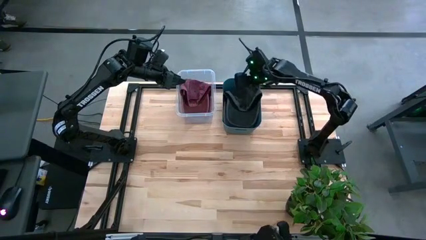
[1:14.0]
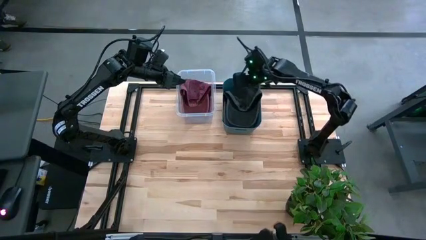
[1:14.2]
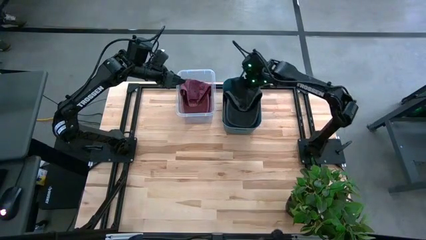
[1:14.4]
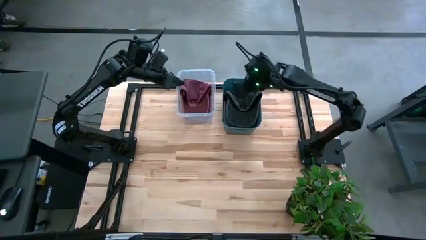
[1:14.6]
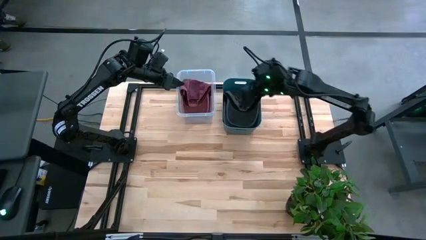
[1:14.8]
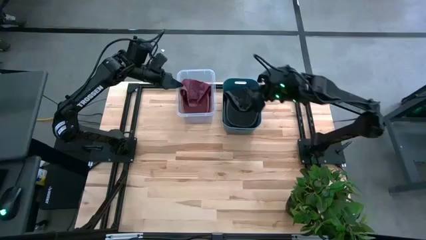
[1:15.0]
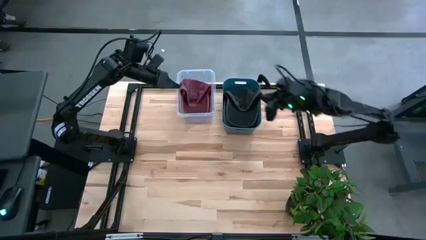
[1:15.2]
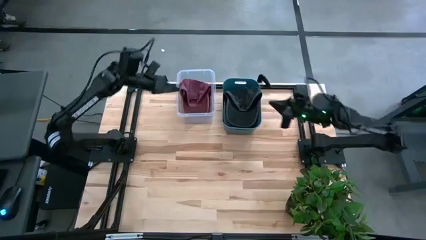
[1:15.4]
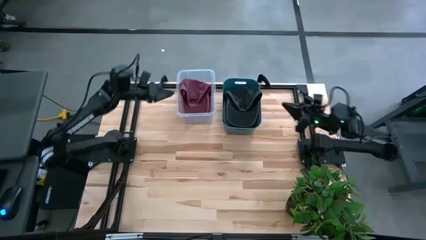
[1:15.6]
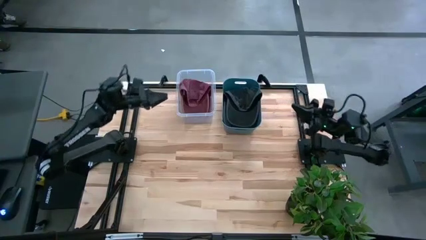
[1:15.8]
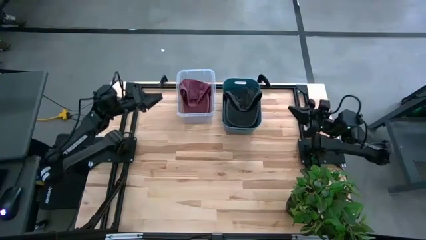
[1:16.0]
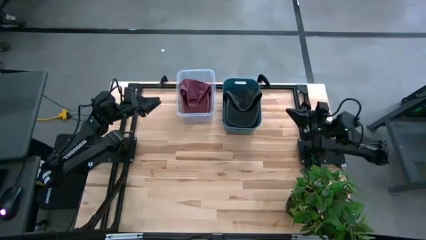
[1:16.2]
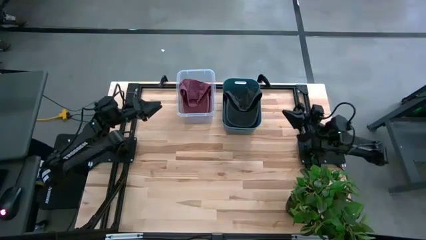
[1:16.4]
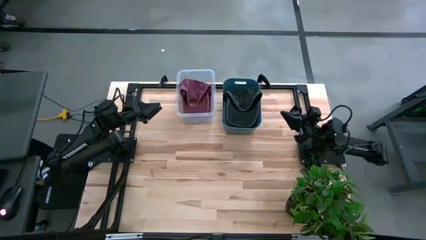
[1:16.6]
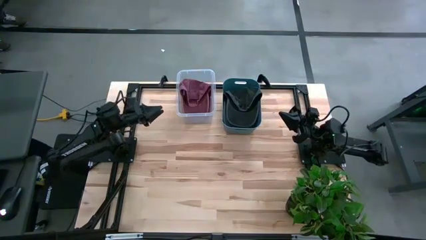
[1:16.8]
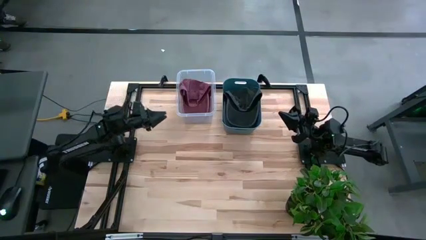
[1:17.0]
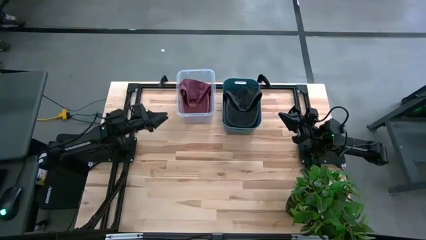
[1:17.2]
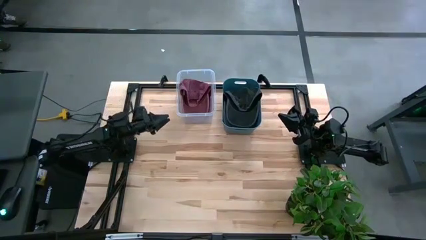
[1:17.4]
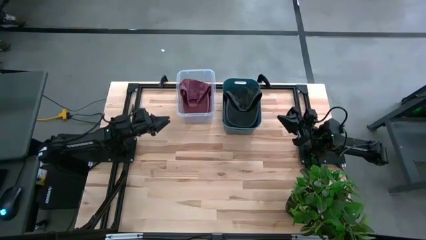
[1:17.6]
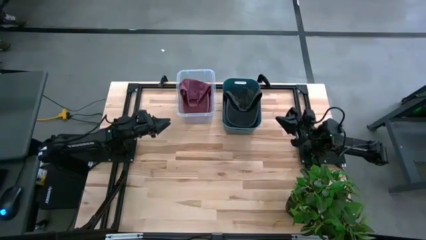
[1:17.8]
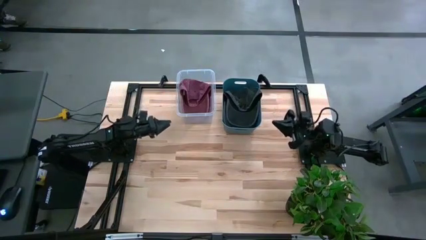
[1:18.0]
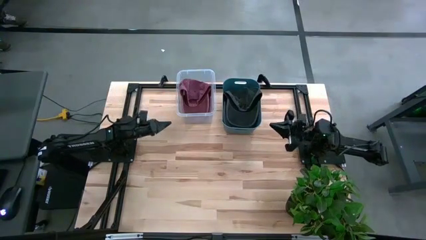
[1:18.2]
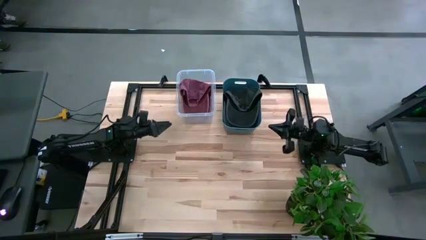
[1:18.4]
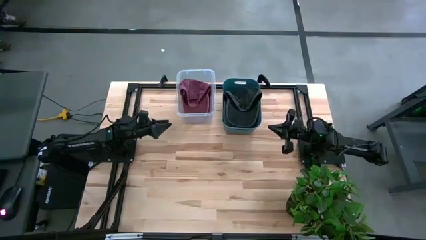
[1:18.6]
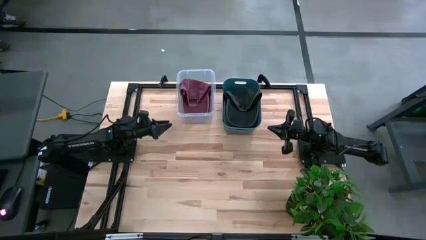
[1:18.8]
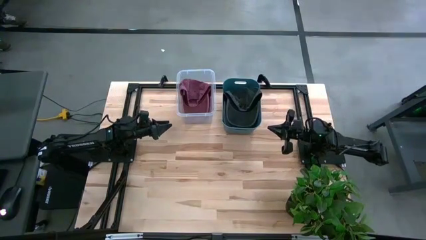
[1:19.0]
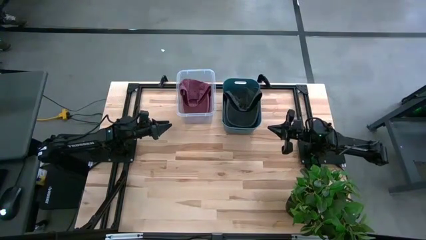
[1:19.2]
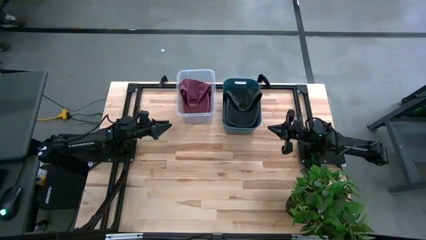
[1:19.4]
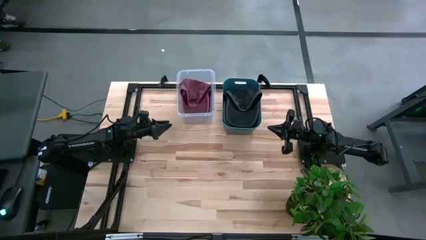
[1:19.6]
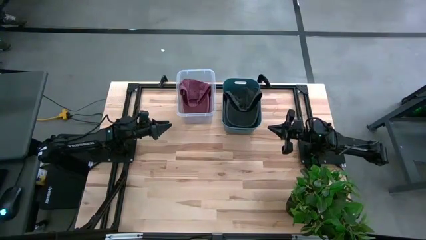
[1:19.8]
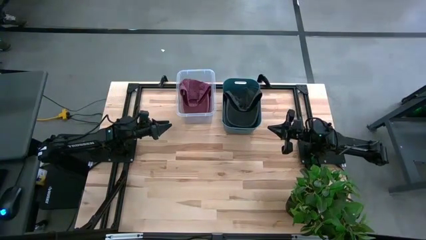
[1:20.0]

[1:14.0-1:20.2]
Task: Pick & Place hat
Return to Home Position

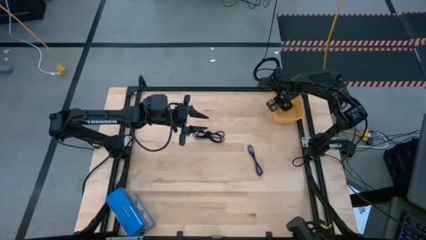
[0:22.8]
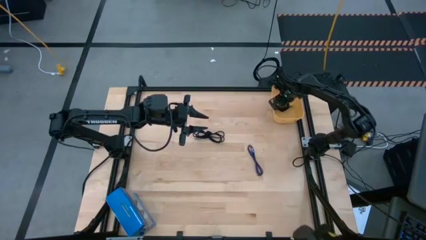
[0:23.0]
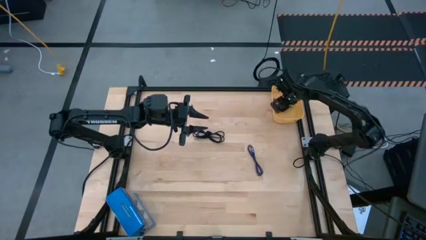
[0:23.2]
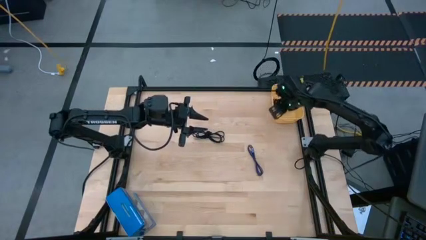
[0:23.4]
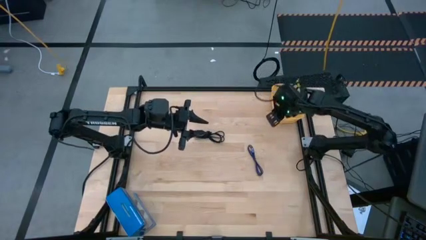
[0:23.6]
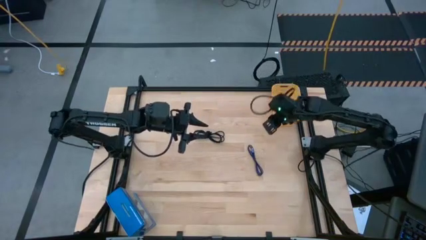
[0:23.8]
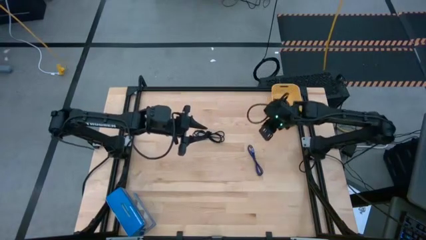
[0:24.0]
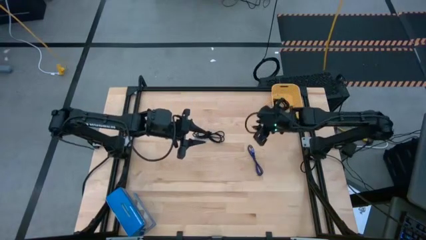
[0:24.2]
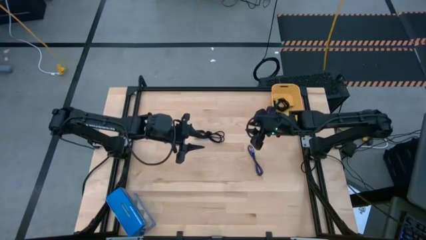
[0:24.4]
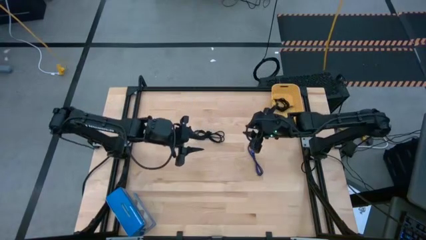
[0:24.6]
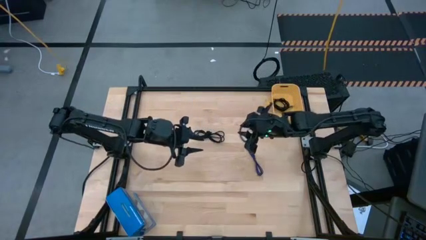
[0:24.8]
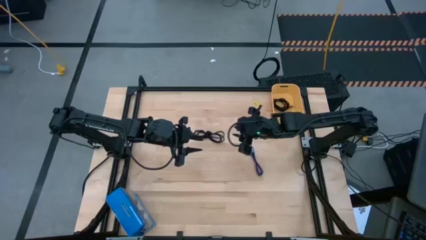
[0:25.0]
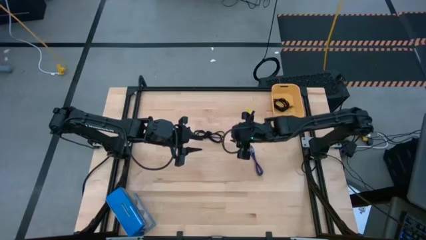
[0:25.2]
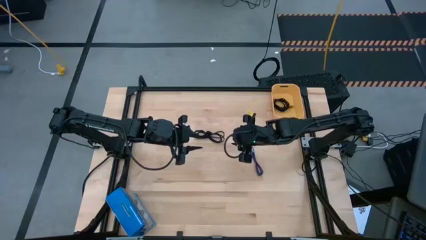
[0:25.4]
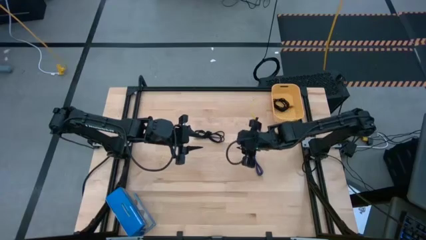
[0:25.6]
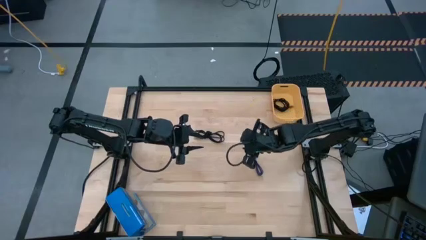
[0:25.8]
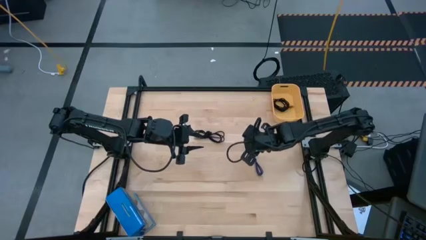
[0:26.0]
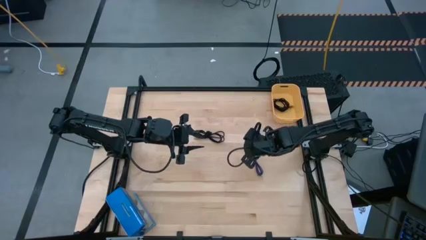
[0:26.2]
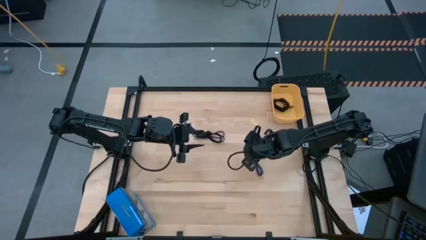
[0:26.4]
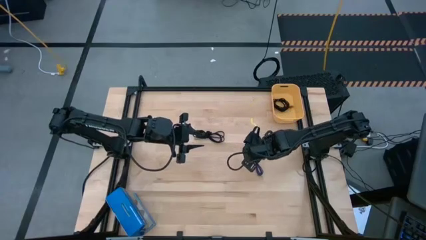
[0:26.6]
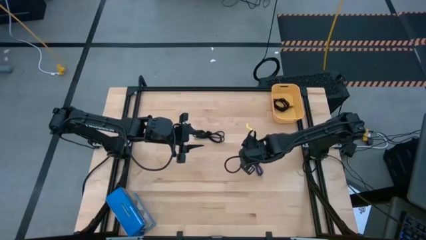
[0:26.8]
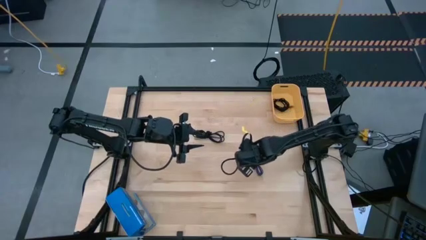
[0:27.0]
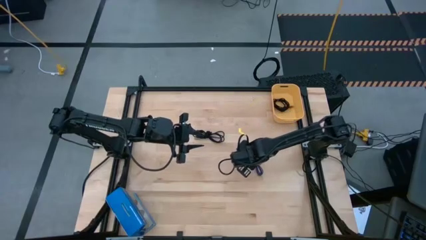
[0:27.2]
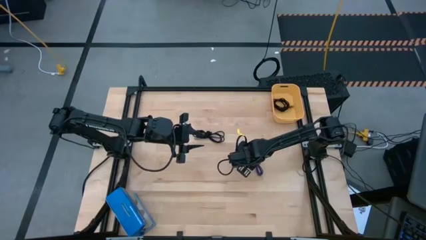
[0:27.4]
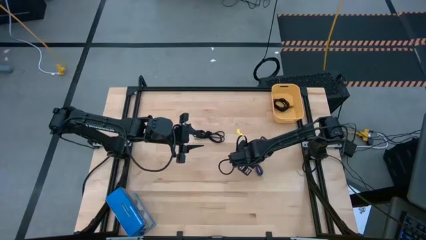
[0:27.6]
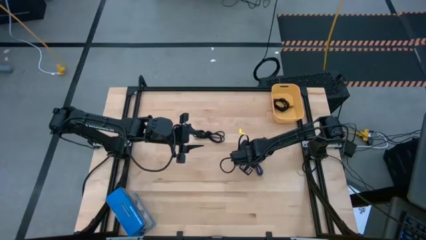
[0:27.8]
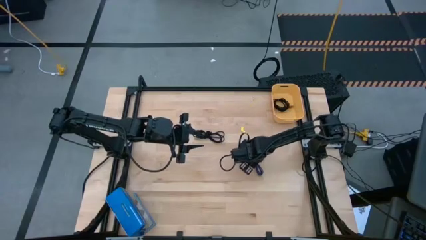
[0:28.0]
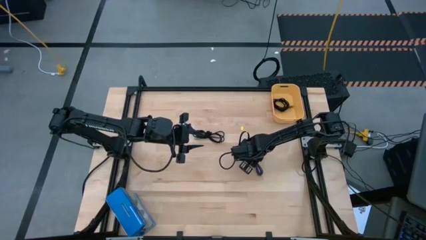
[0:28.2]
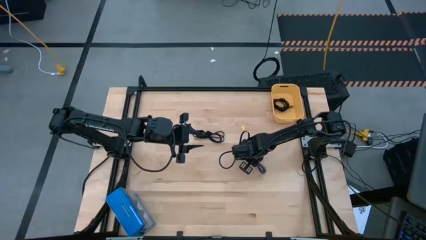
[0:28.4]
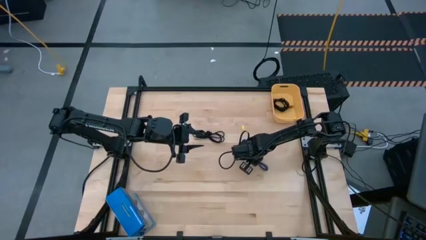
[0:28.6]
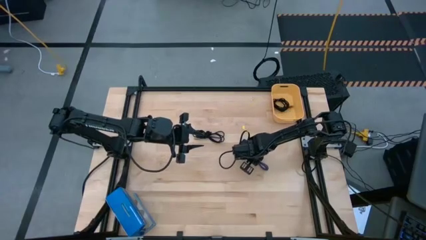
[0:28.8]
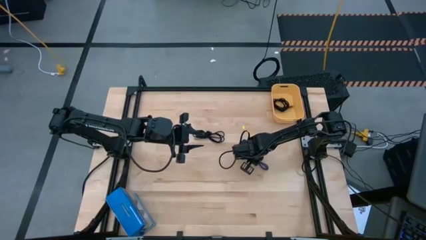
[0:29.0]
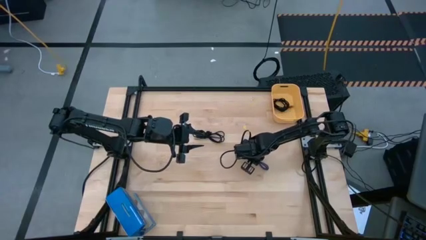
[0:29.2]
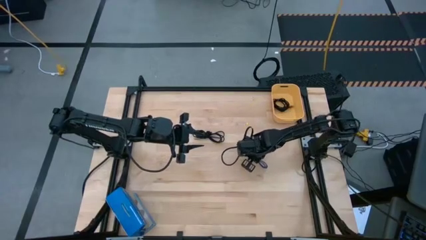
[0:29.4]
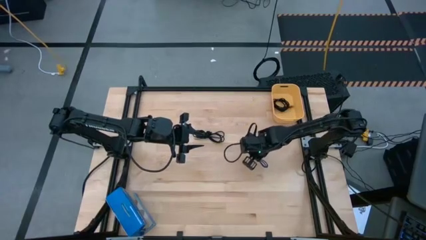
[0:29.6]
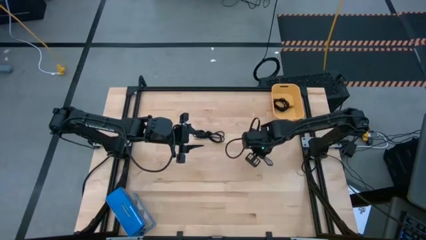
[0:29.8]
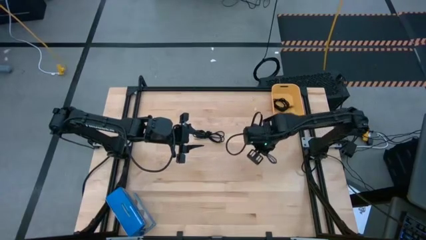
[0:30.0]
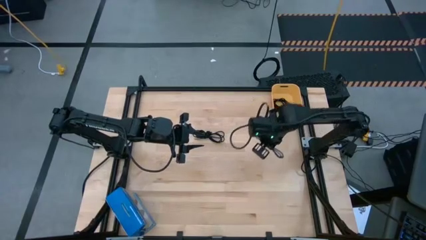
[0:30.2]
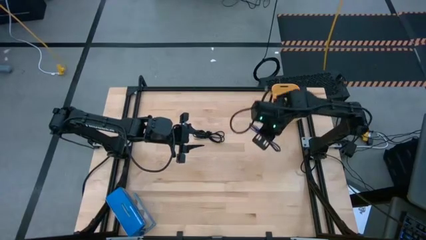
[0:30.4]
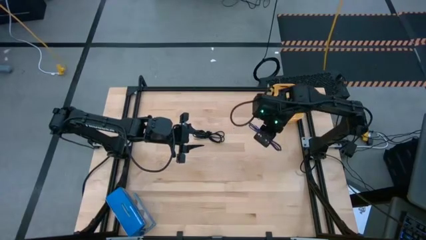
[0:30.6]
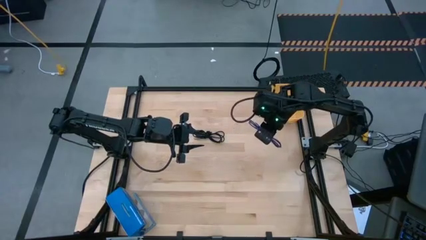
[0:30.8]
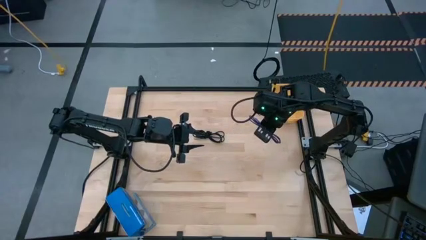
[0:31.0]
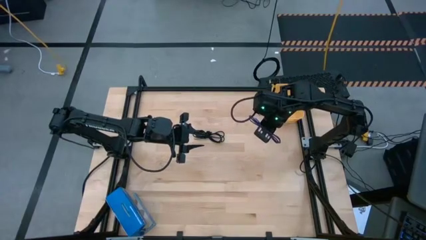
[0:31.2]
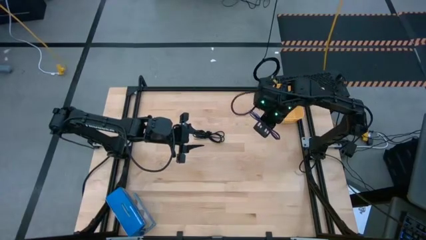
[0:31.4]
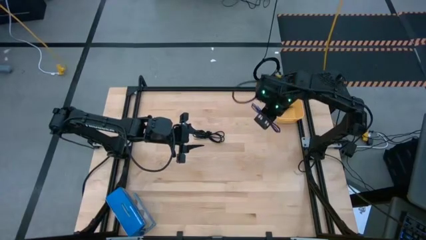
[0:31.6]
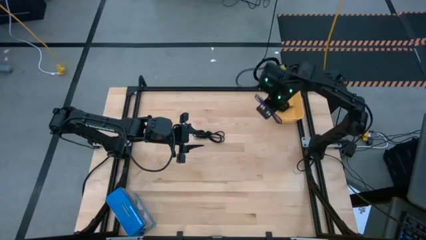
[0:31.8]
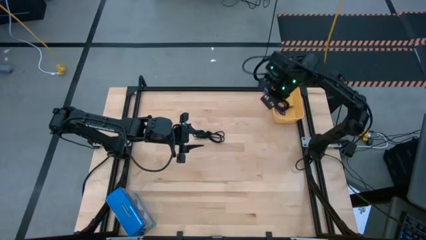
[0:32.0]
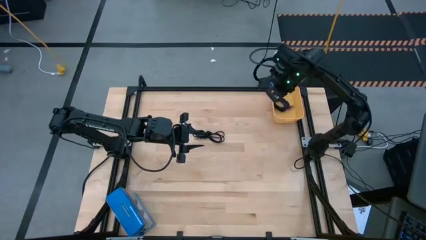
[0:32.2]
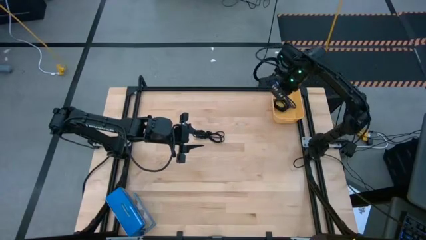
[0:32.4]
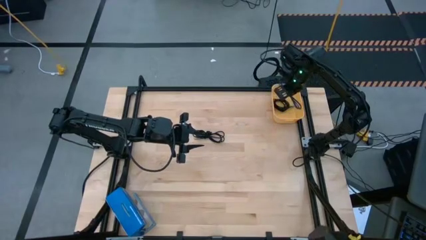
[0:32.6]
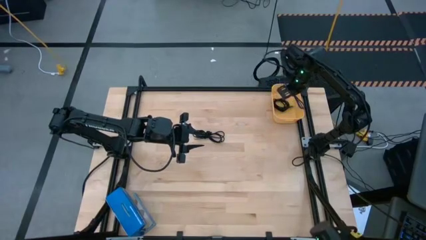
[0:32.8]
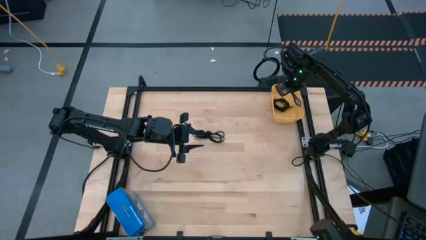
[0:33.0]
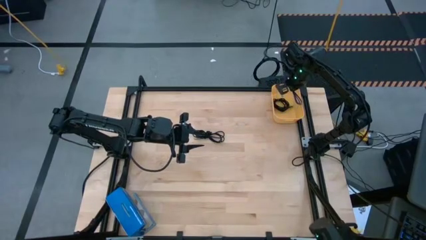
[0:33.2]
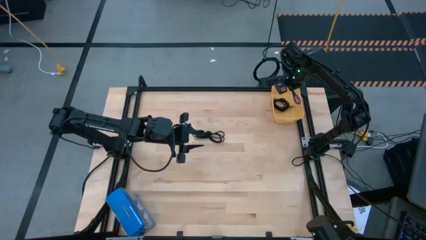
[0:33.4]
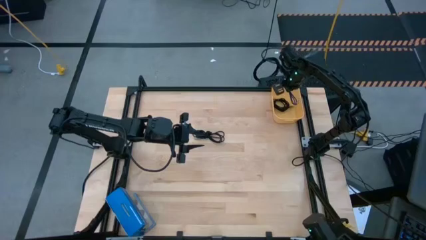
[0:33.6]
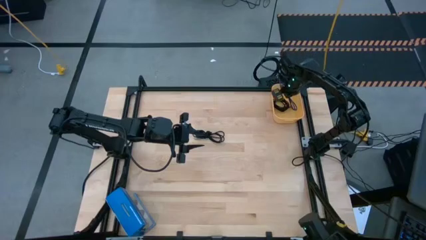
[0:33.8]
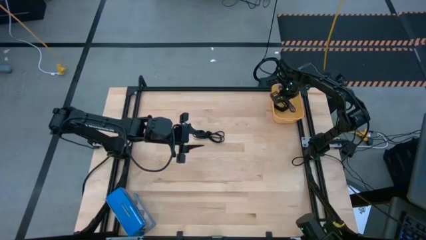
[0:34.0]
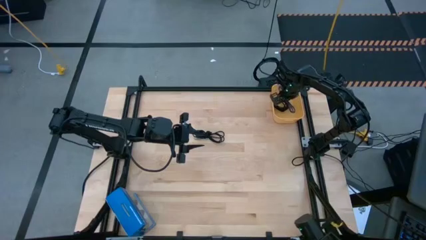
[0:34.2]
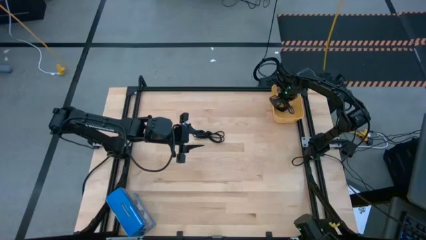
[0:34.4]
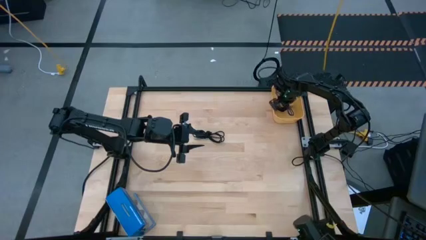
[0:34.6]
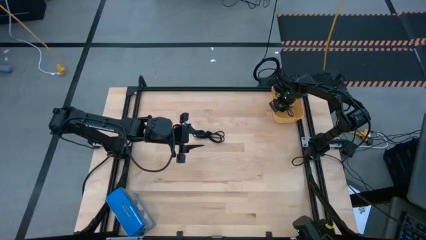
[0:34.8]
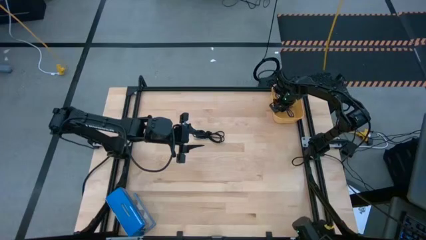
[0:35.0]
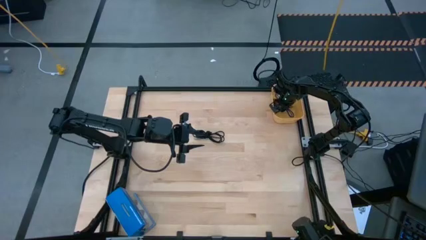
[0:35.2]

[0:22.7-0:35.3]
Task: Pick and place USB-C Cables
Put the purple charger cable into the yellow bin
